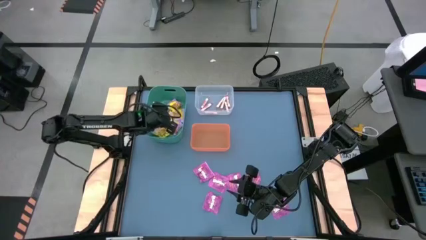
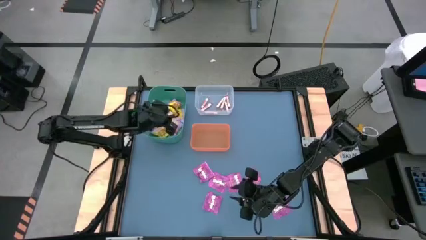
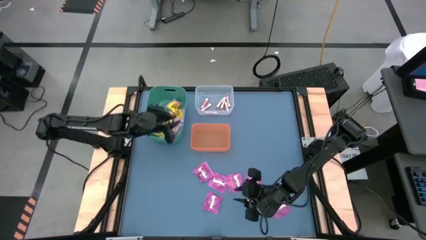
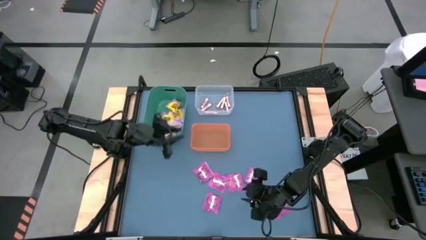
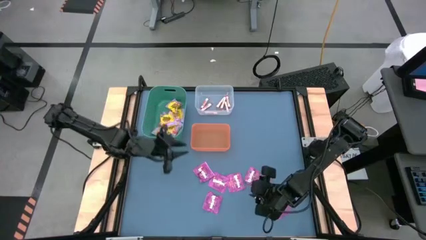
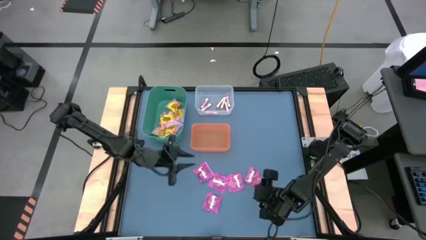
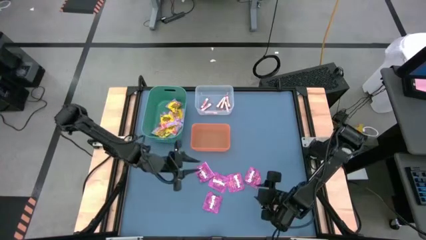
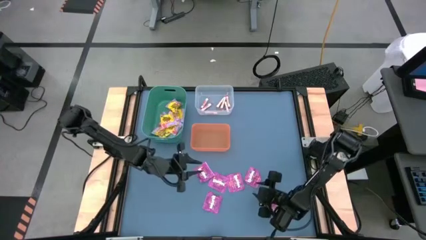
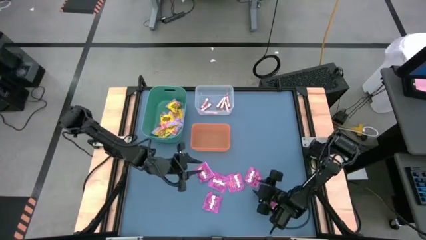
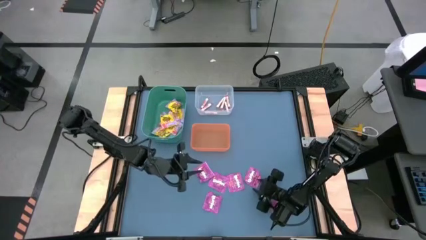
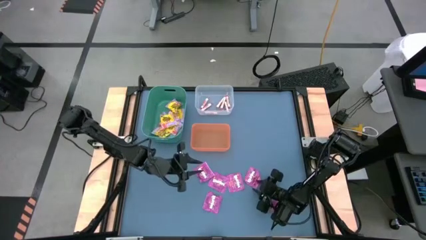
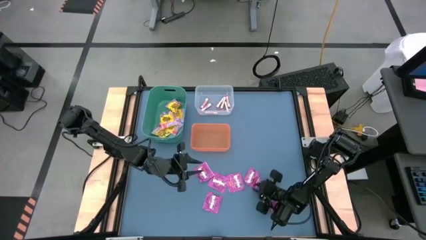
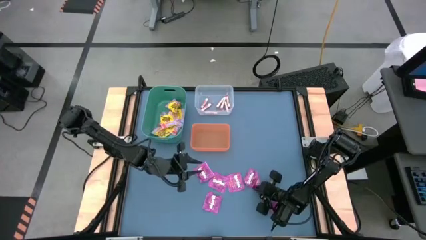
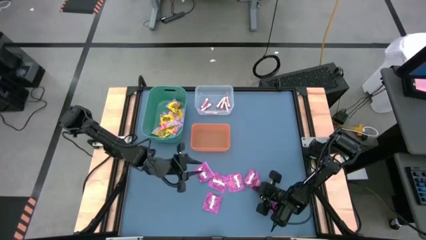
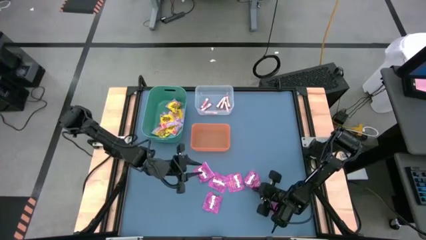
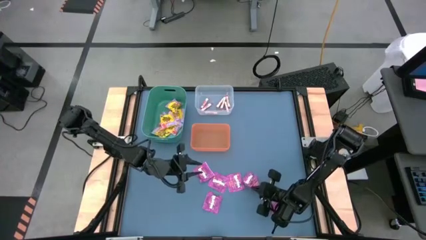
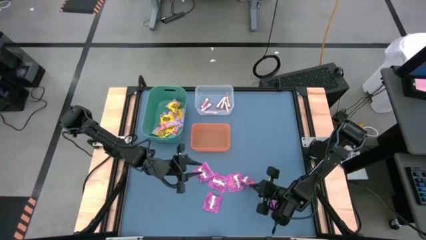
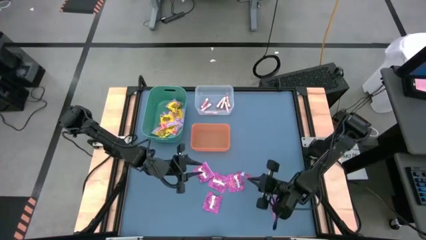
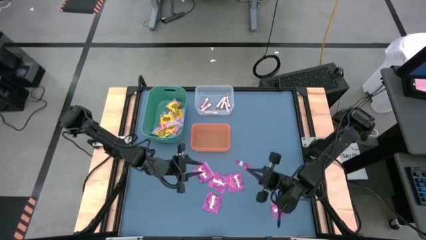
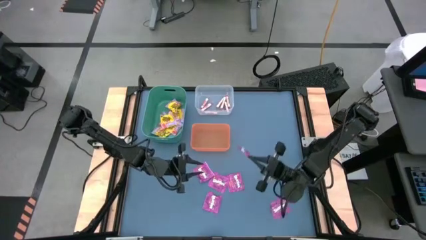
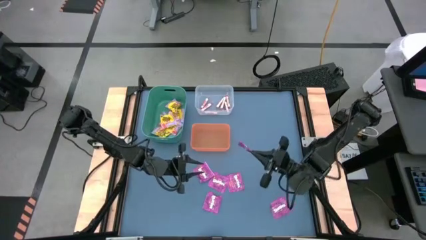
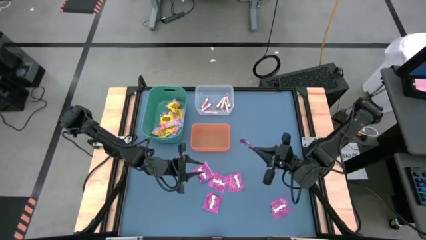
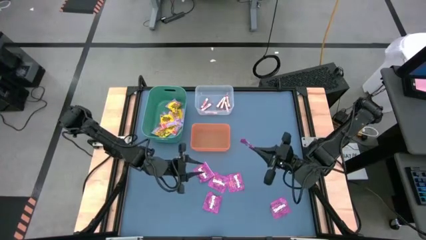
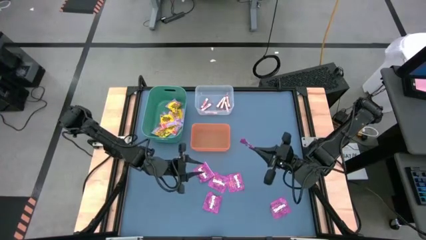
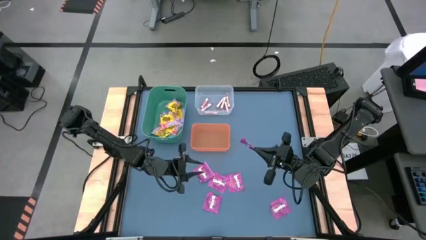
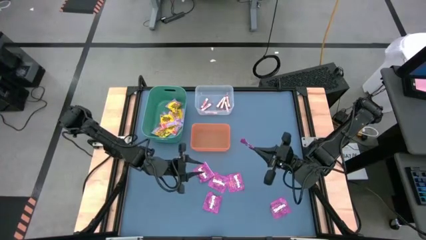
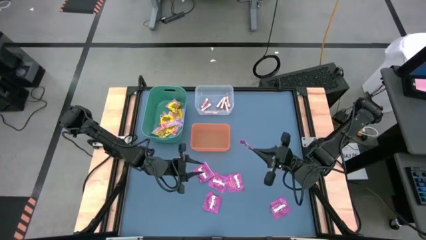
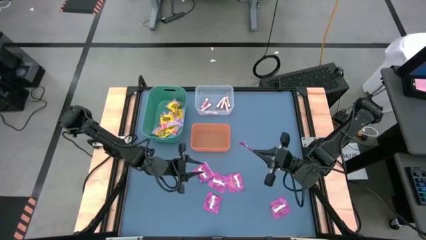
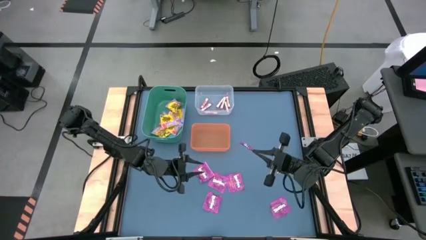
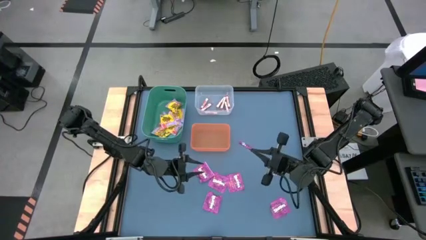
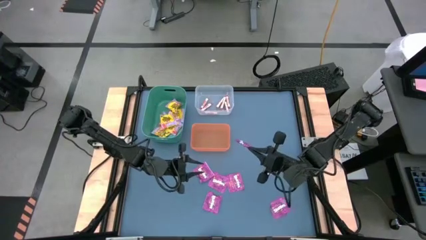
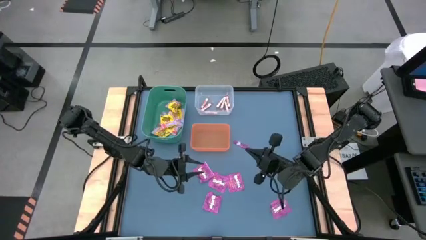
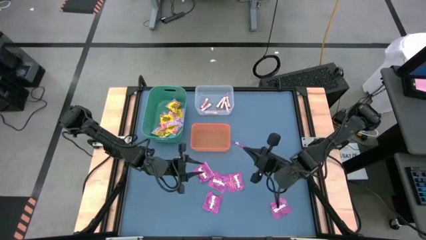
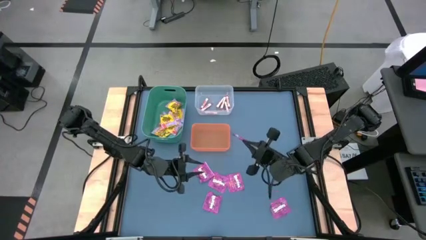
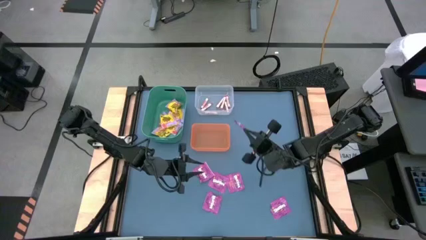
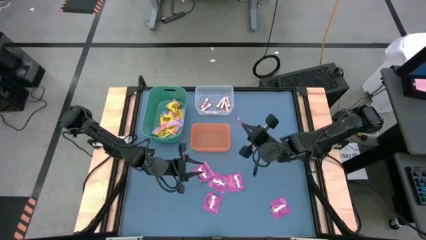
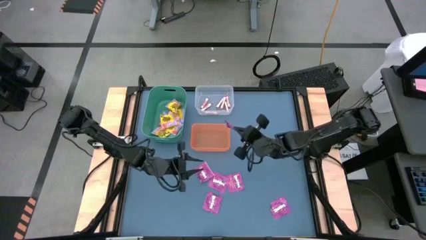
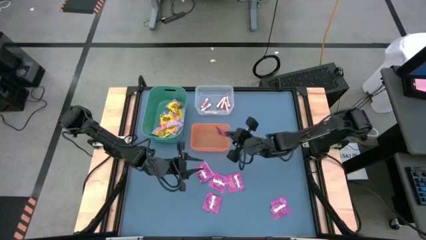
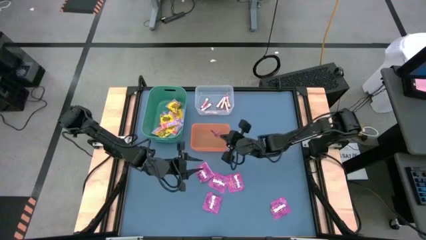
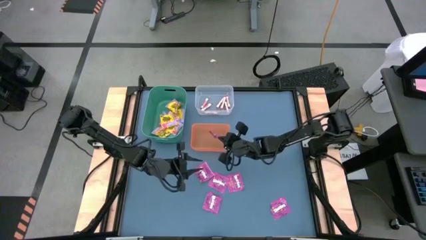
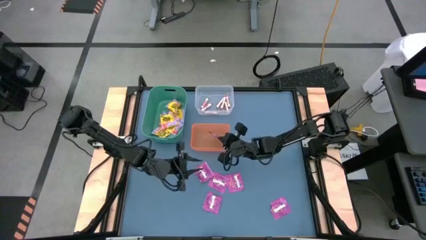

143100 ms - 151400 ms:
Task: Sort candy
Put the violet candy into the orange bin

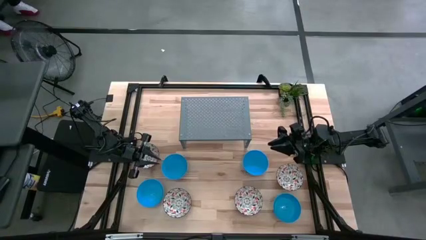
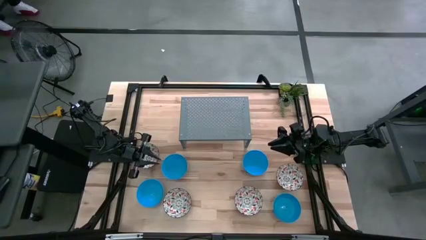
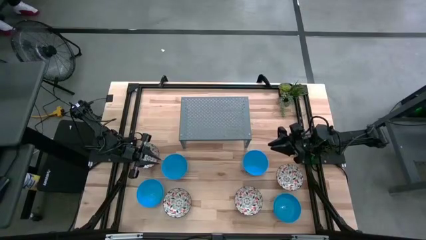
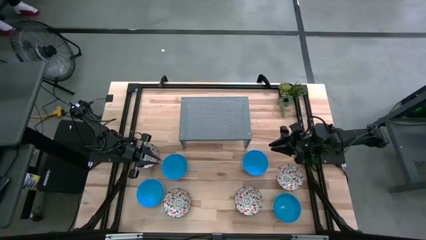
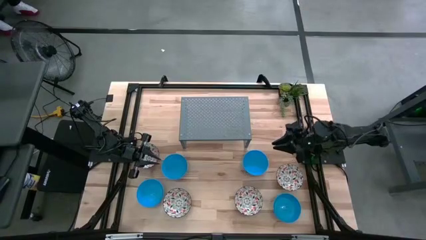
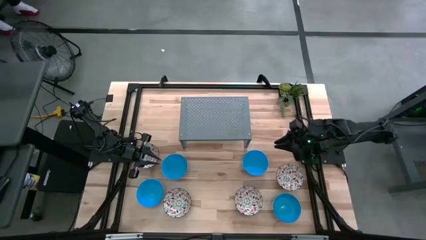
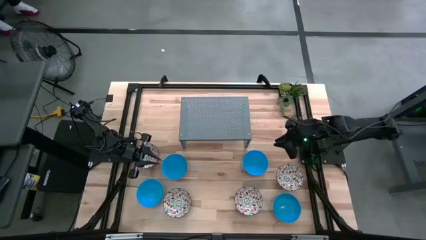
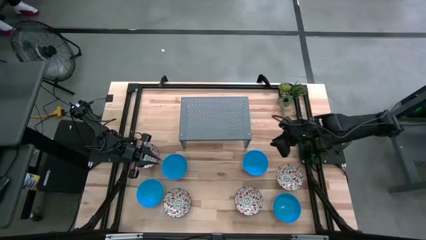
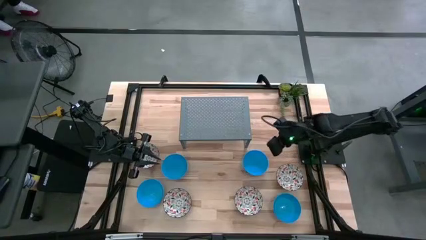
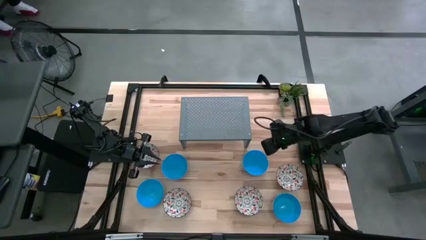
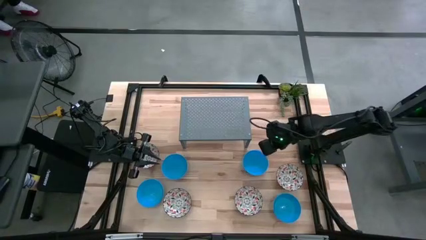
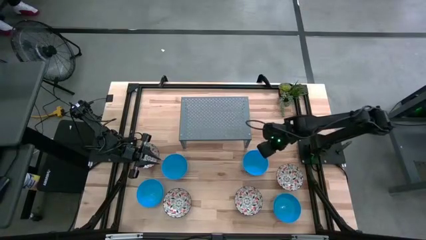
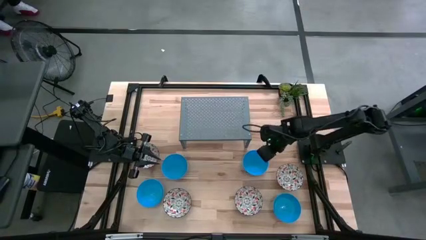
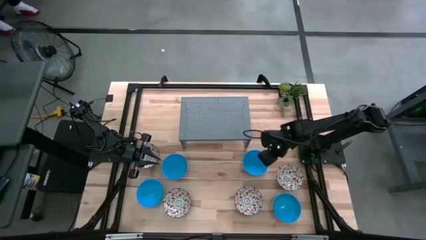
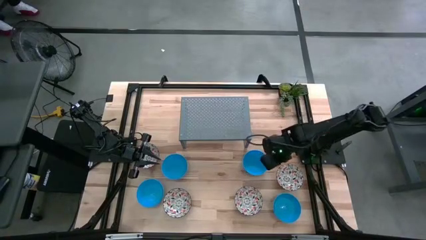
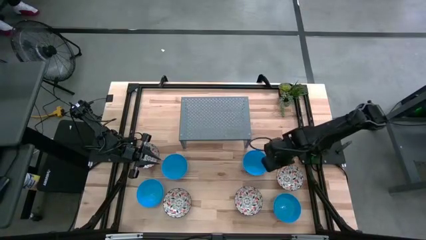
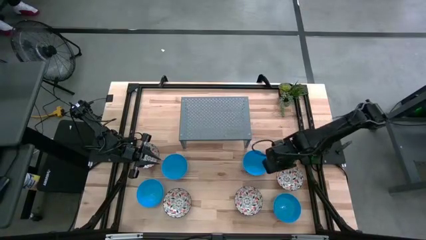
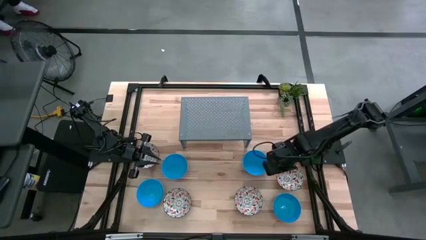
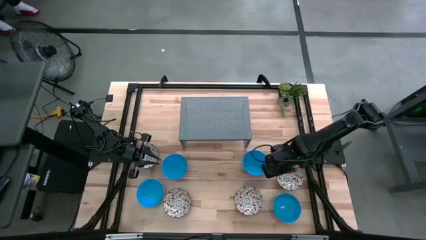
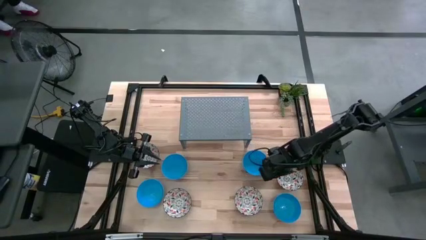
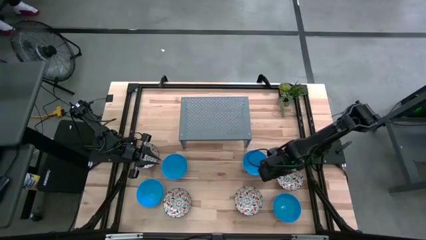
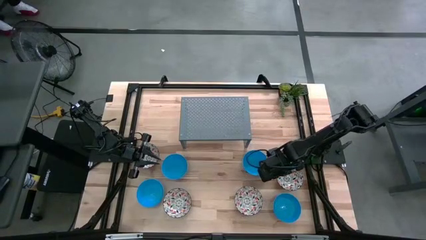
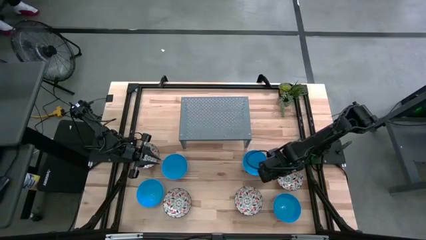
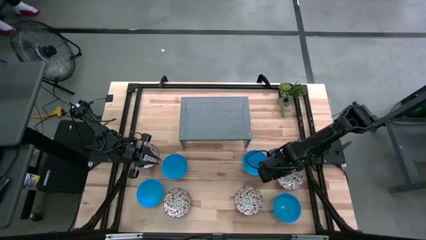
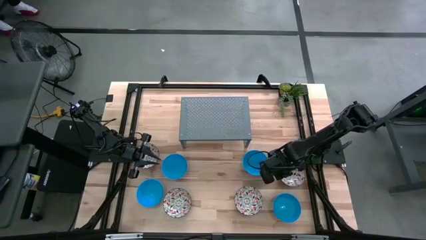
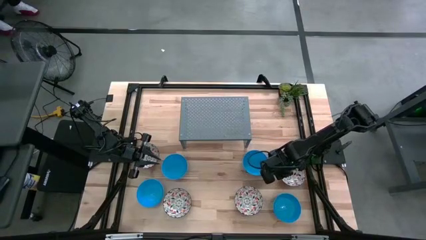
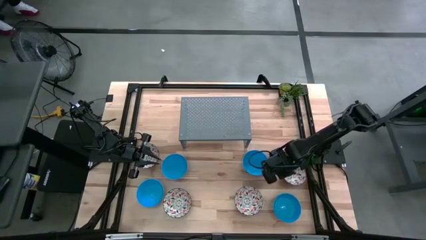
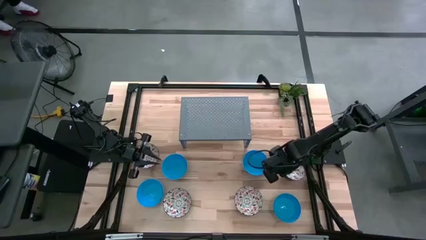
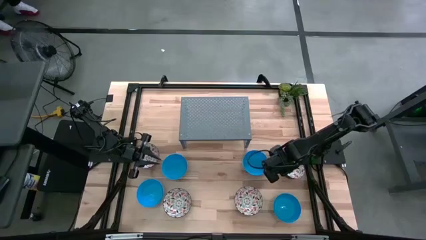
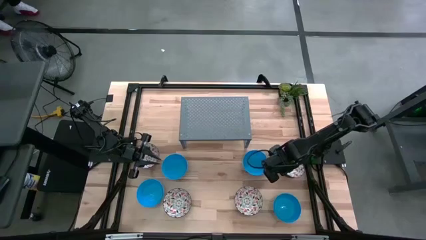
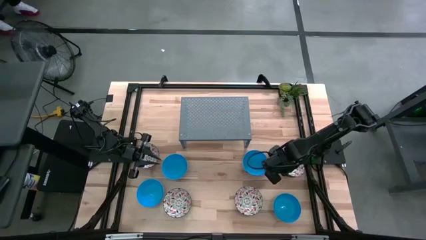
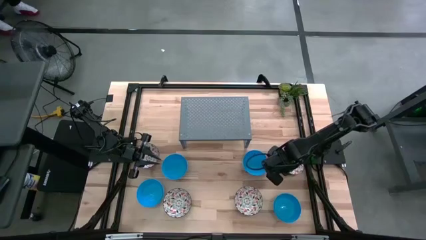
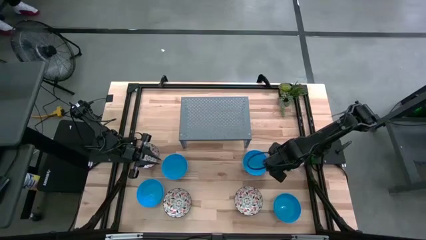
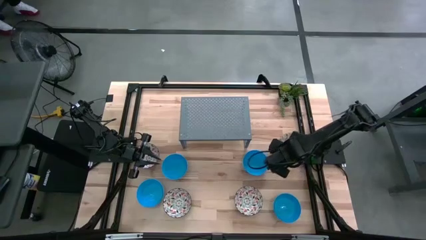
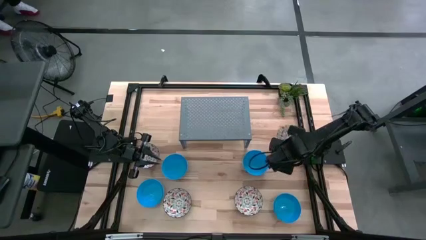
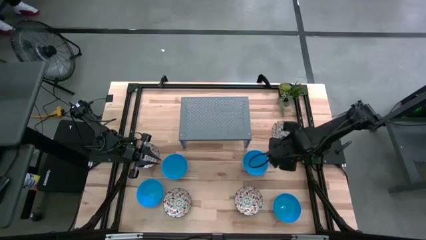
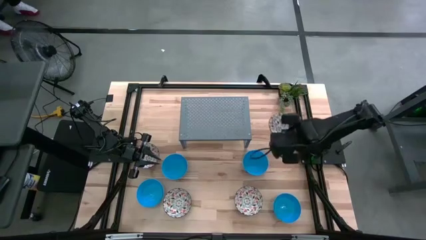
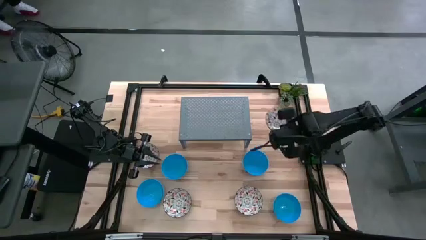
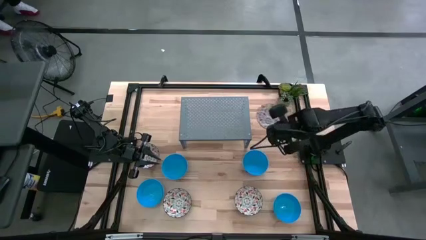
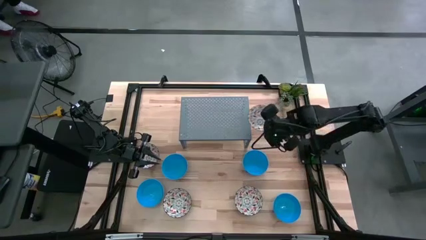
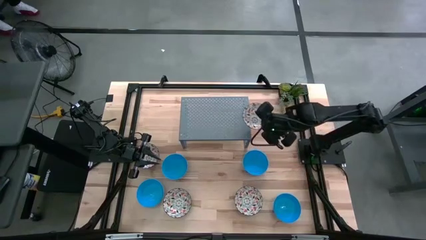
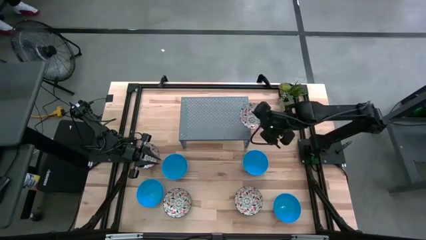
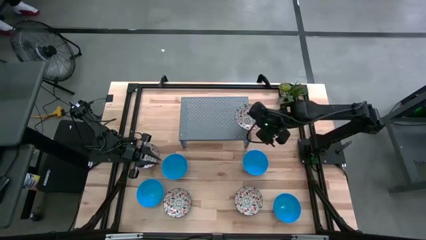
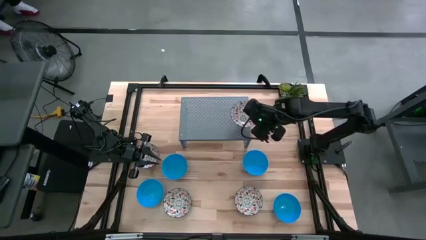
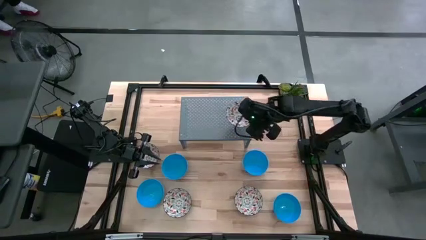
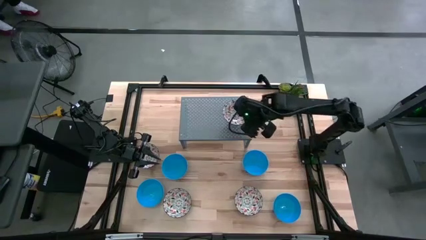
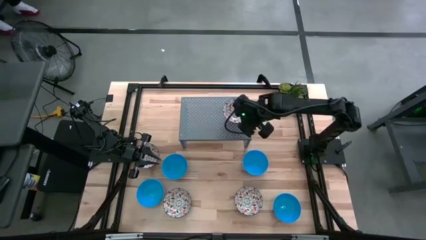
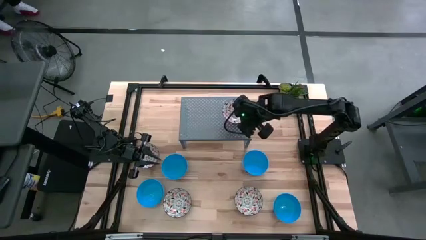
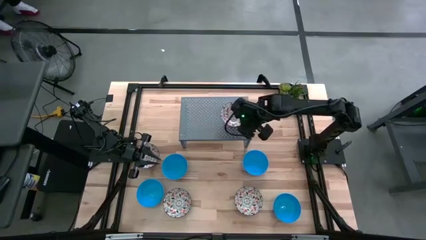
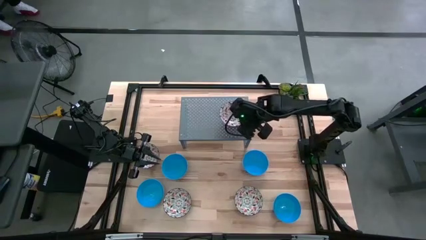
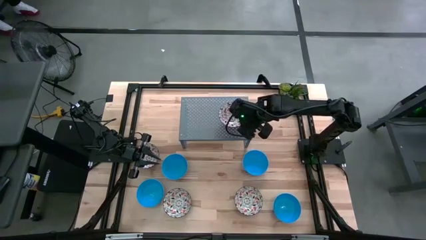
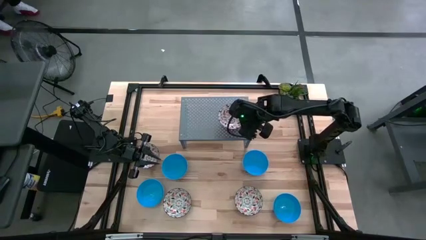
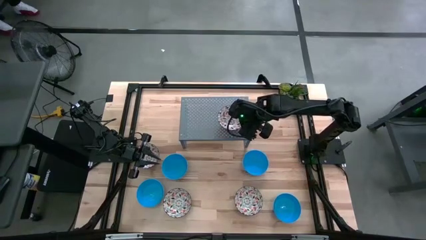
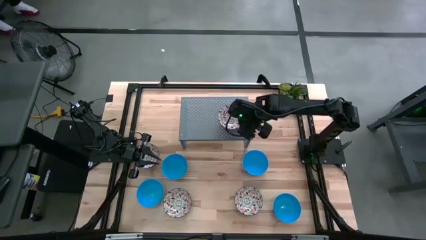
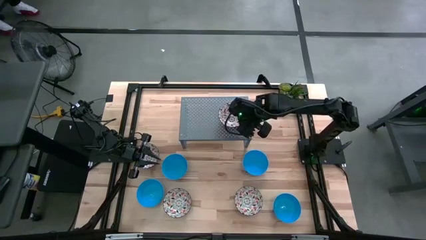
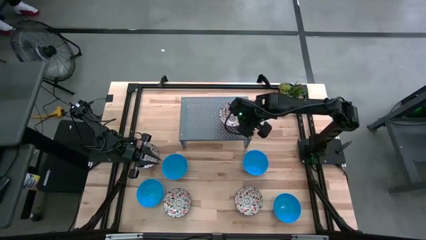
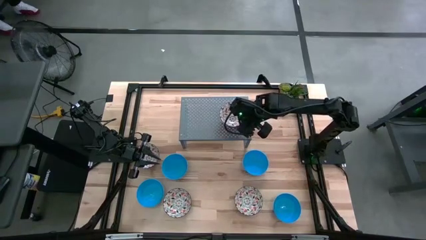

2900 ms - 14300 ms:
Task: Pick & Place Mini bowls
Put the white bowl on the shelf
